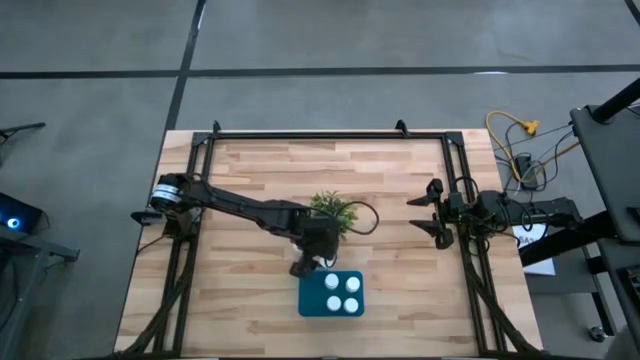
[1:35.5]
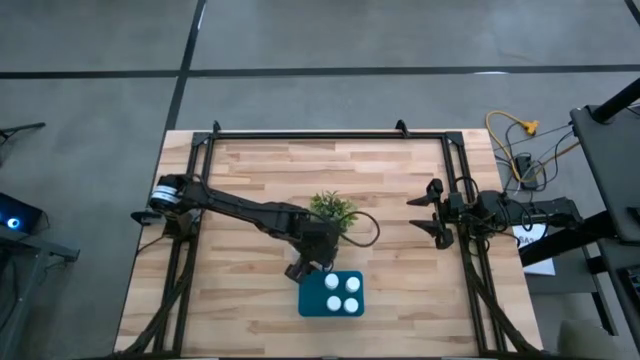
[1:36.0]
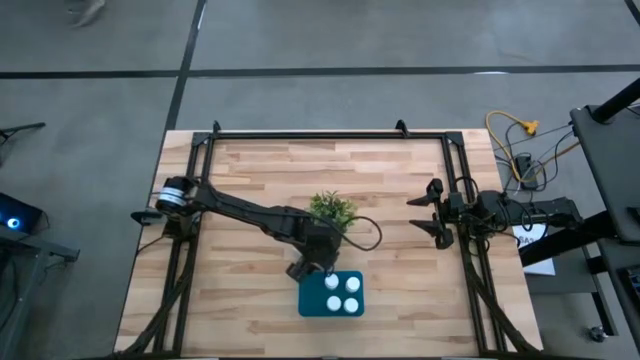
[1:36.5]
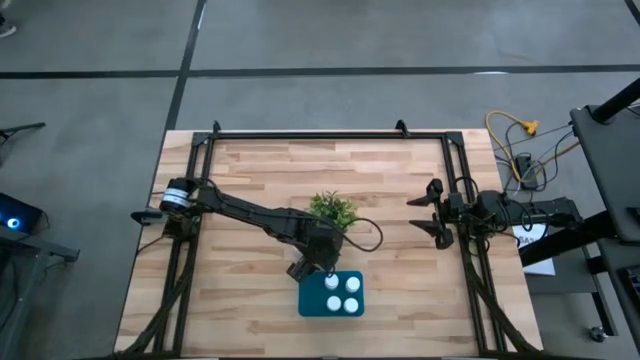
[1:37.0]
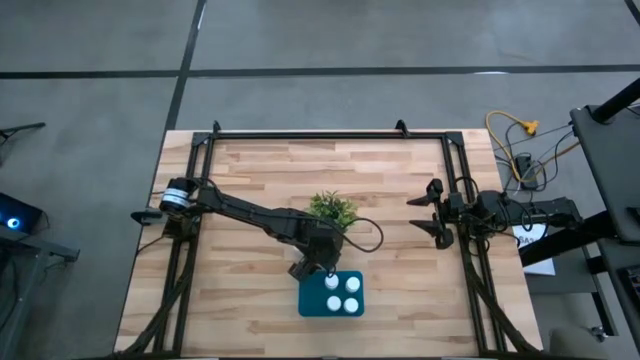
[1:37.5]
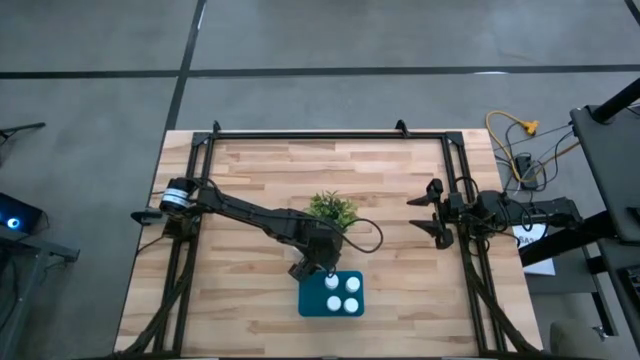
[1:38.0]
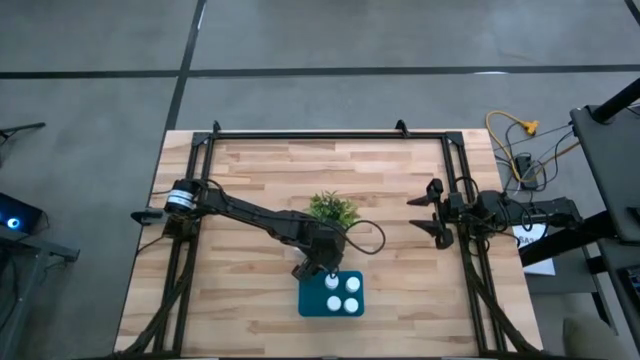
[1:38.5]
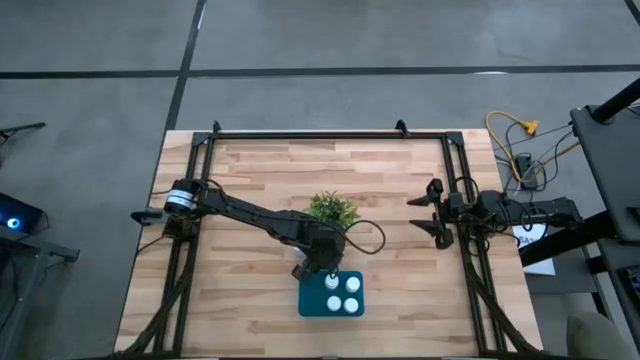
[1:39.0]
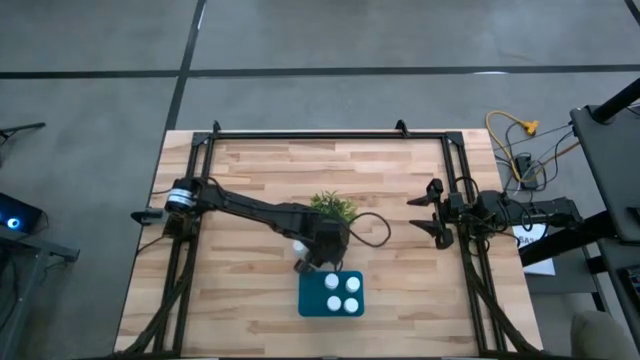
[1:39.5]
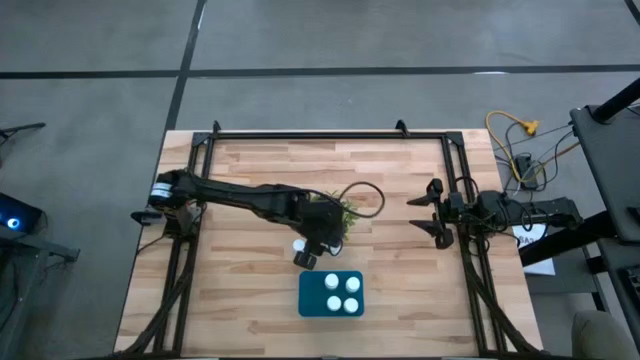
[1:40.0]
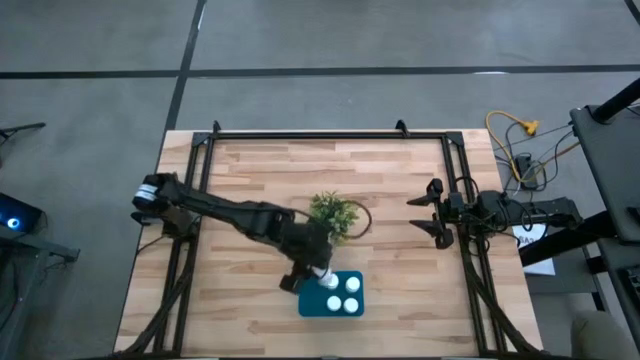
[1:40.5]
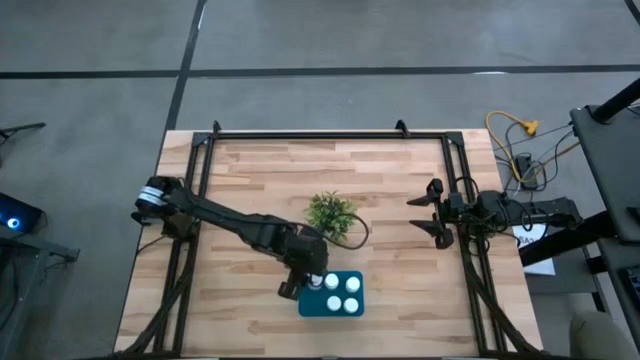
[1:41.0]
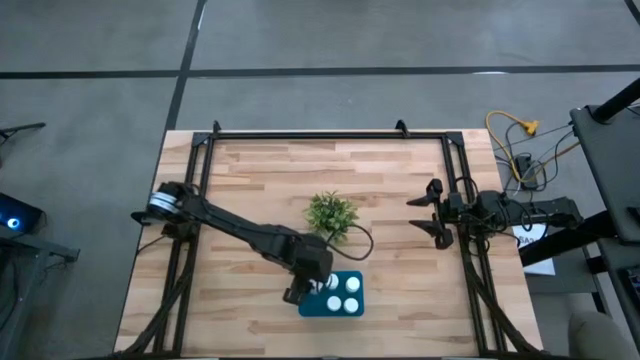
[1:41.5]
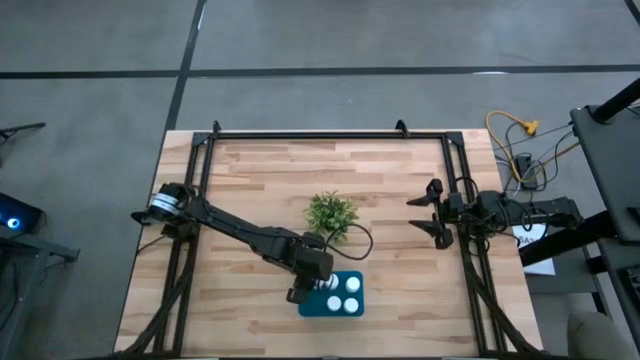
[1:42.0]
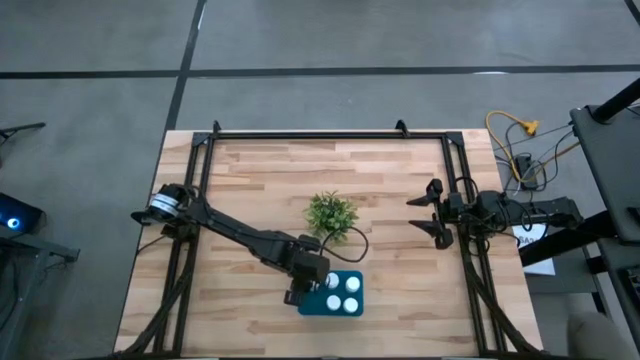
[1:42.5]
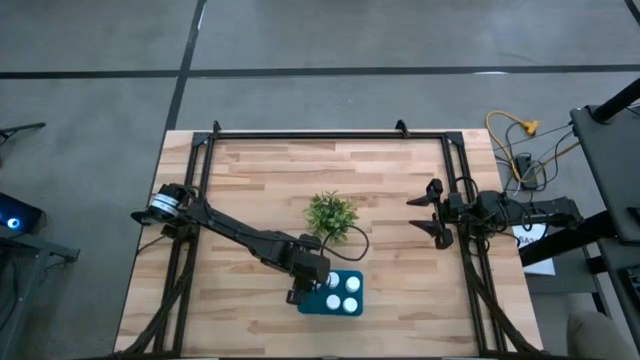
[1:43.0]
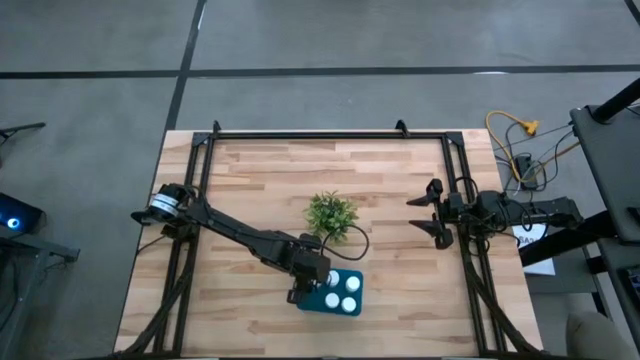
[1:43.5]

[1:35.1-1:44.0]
Task: Pick and place pill bottles into a basket
Put the white medicine bottle into the blue bin

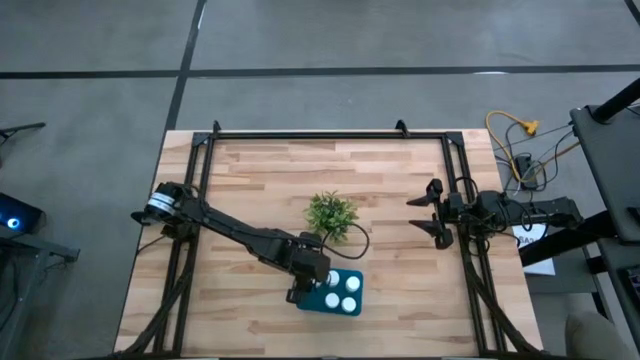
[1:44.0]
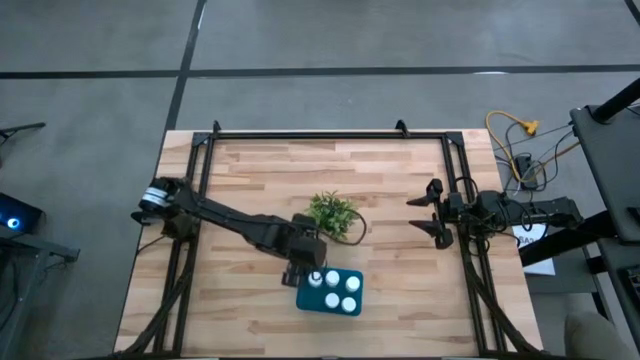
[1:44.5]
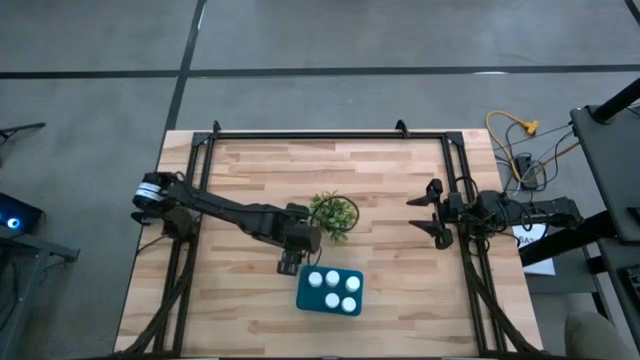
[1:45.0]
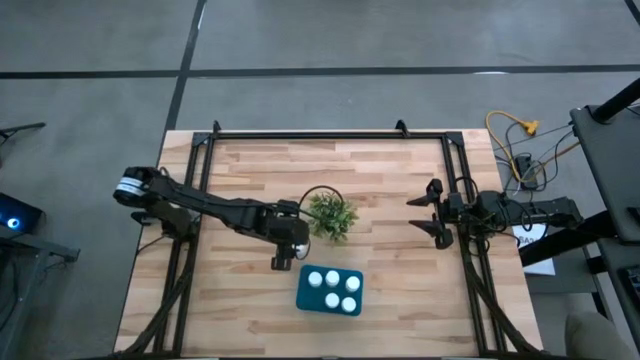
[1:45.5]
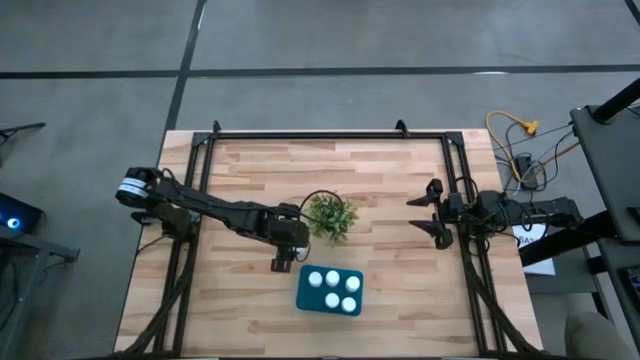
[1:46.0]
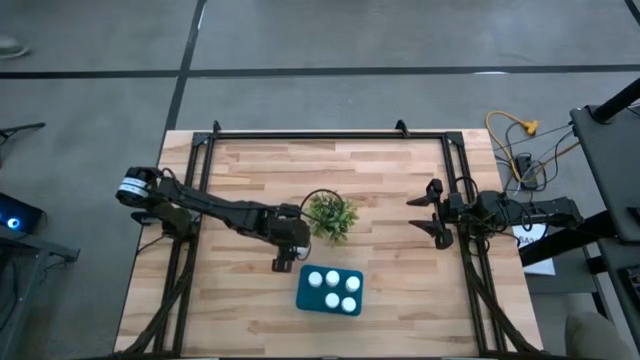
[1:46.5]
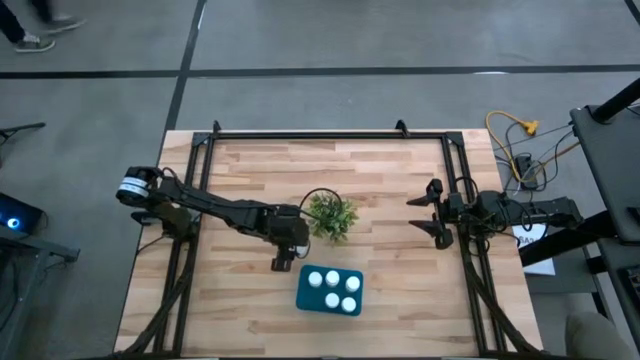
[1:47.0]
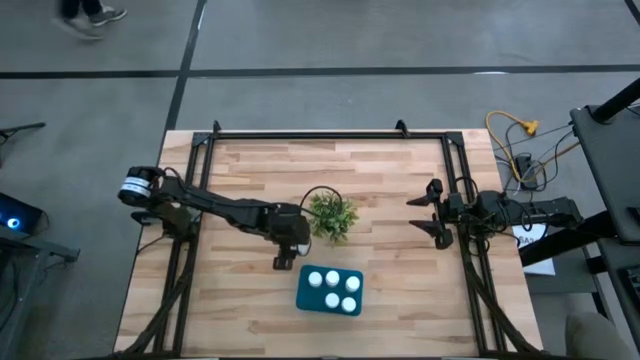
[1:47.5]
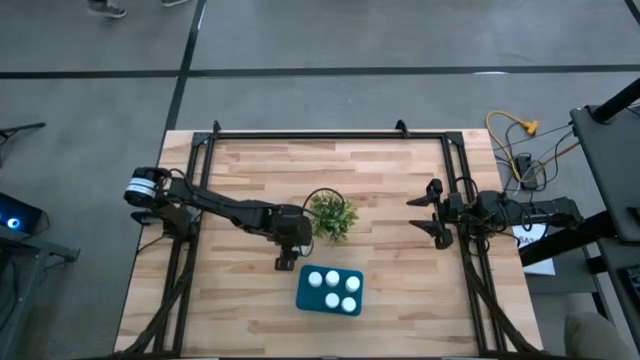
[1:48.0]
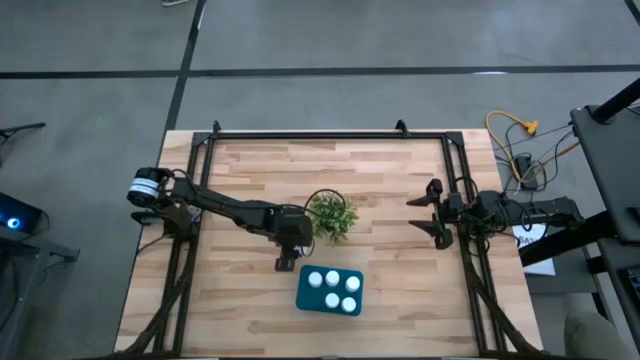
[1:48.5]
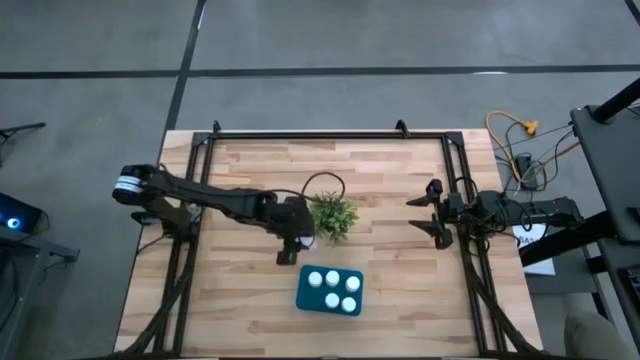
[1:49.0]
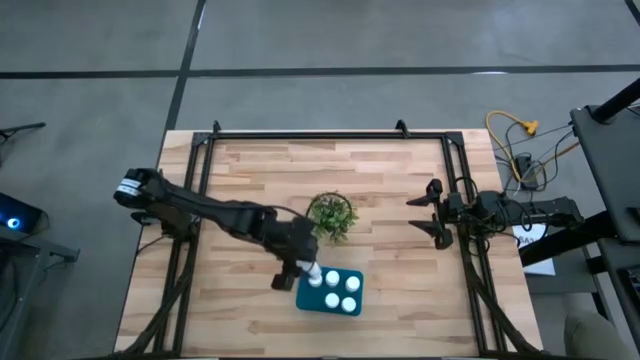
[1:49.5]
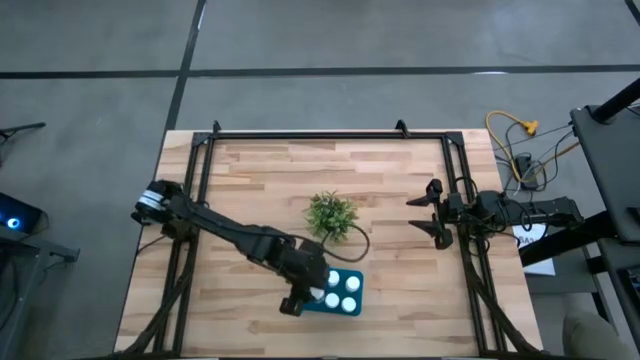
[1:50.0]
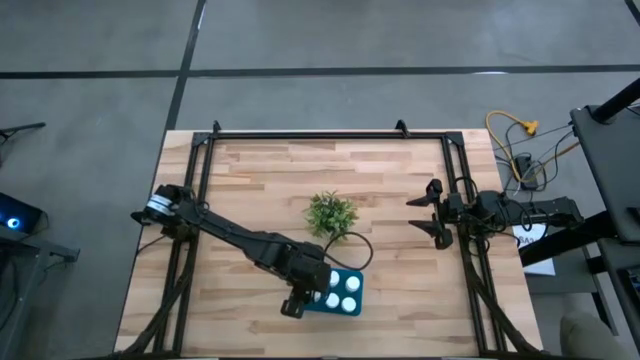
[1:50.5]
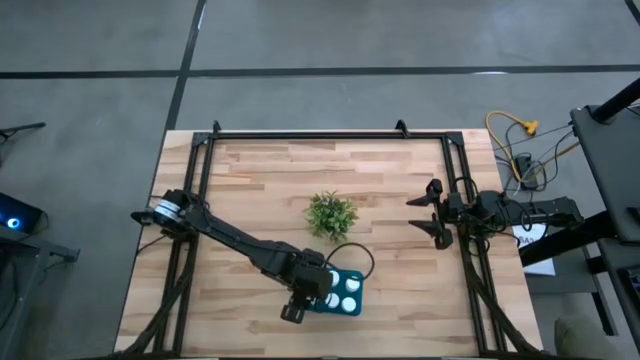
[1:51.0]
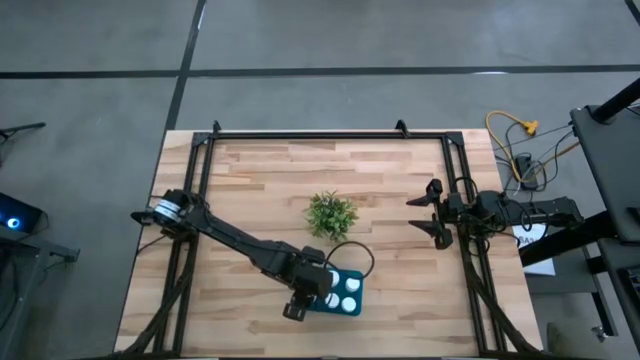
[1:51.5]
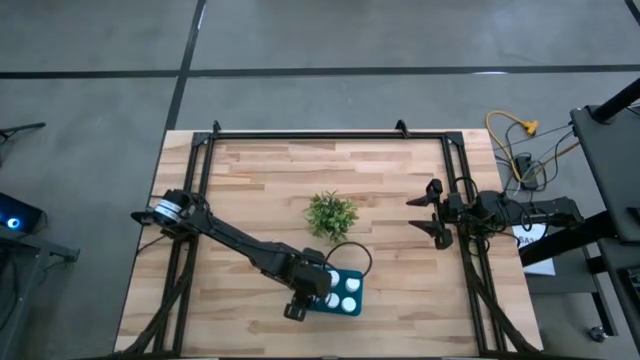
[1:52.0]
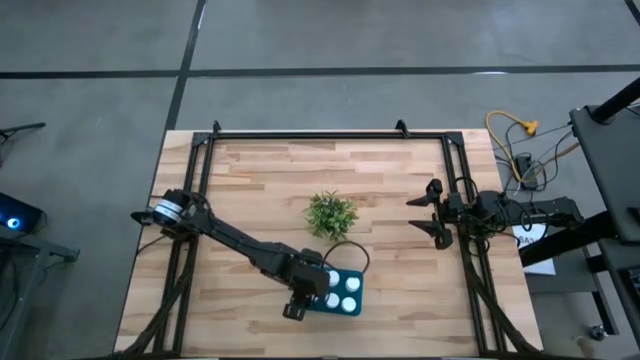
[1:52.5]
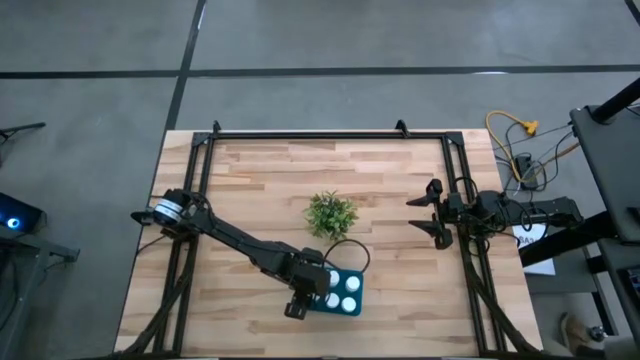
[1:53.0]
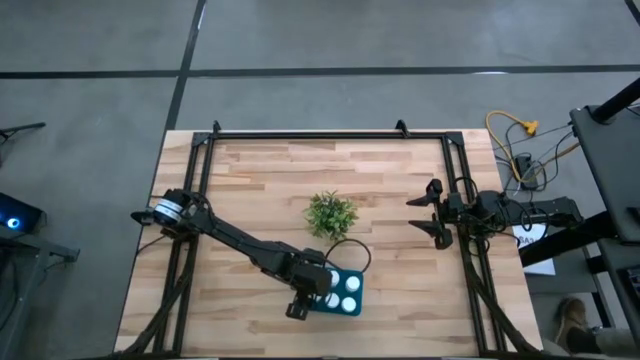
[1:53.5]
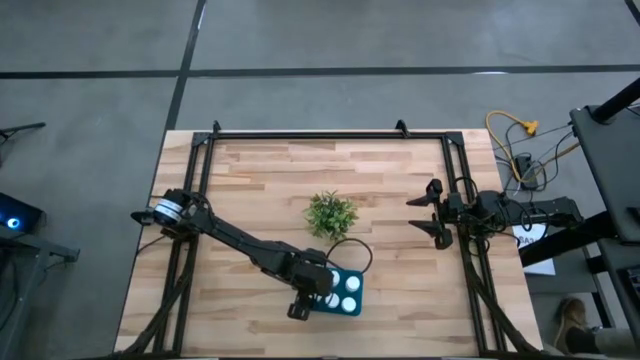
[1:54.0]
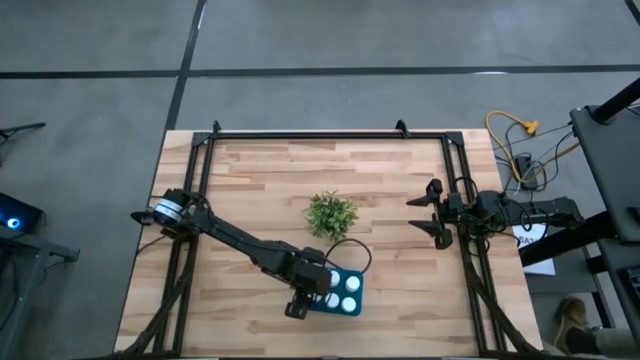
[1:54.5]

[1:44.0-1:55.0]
Put the white medicine bottle into the blue bin

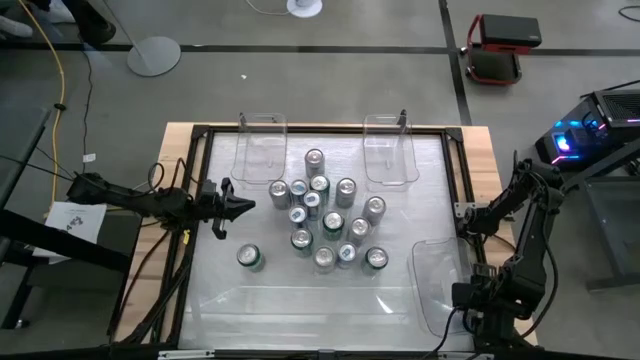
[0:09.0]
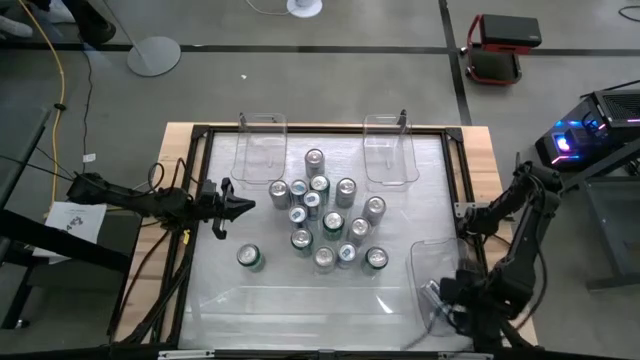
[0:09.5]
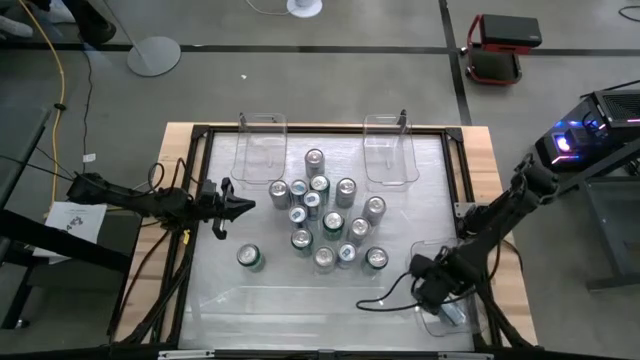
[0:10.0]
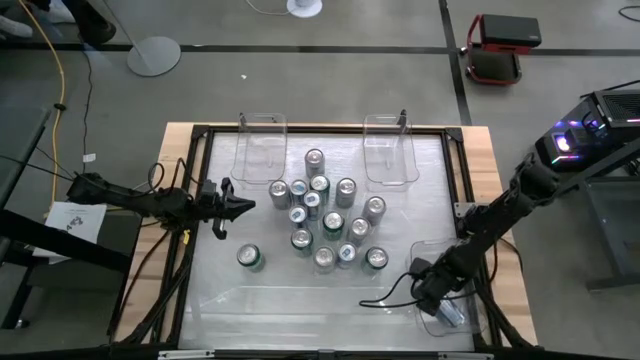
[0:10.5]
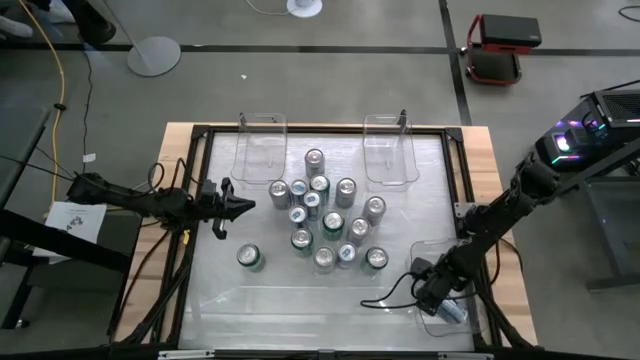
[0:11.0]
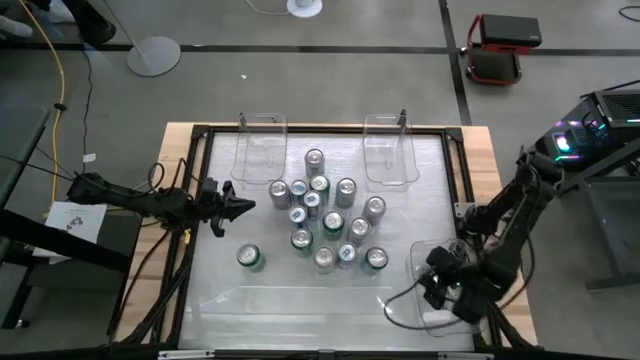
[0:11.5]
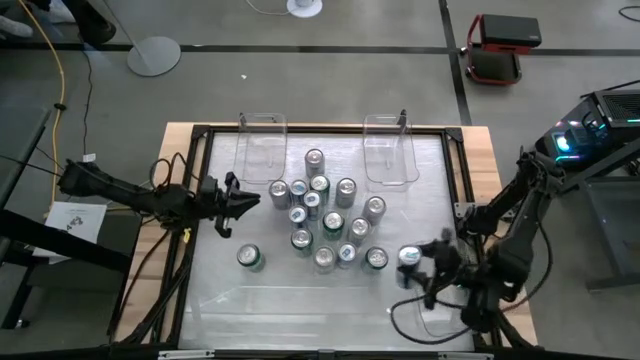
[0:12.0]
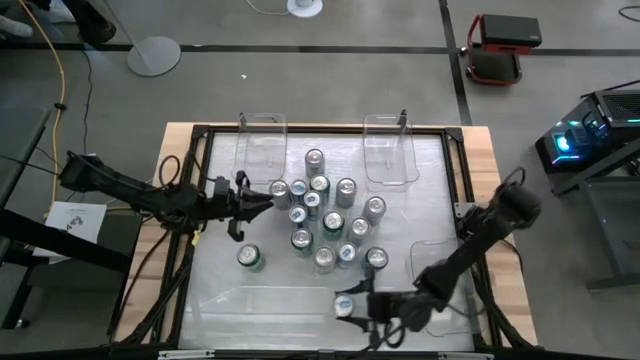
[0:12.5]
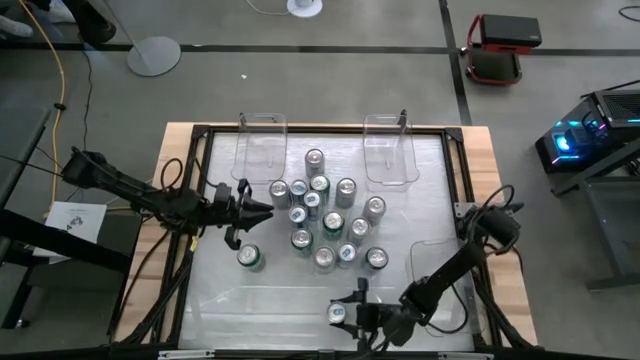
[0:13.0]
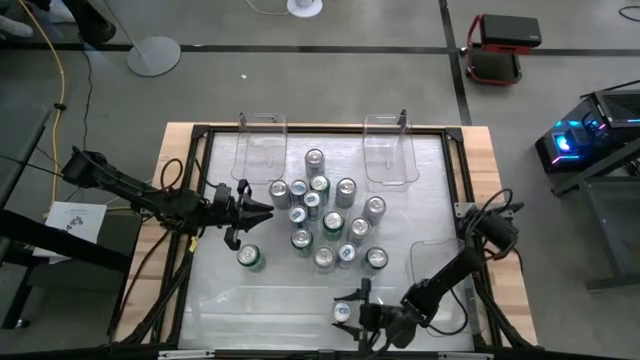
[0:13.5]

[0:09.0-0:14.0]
Task: Sort soda cans
Remove the blue soda can from the bottom right transparent bin
